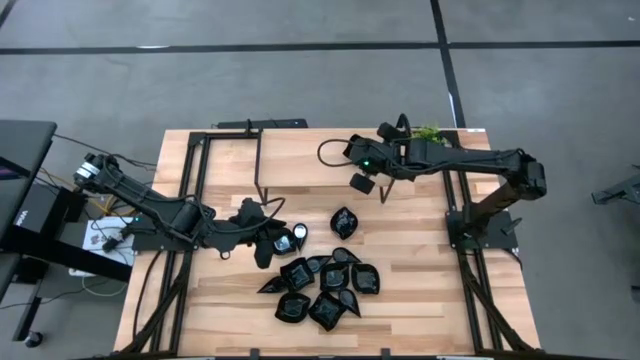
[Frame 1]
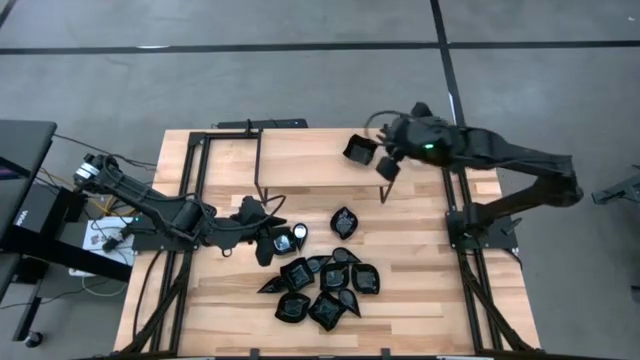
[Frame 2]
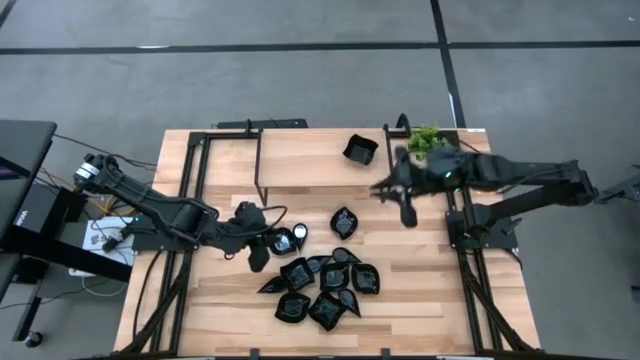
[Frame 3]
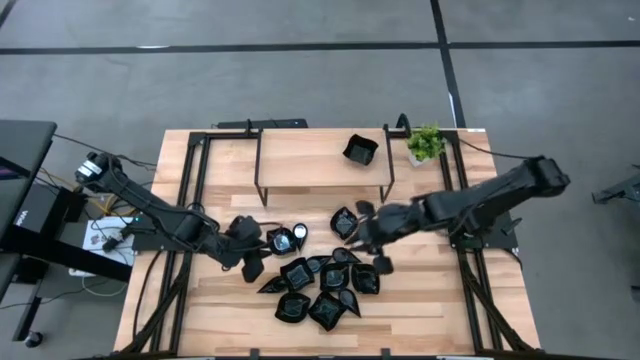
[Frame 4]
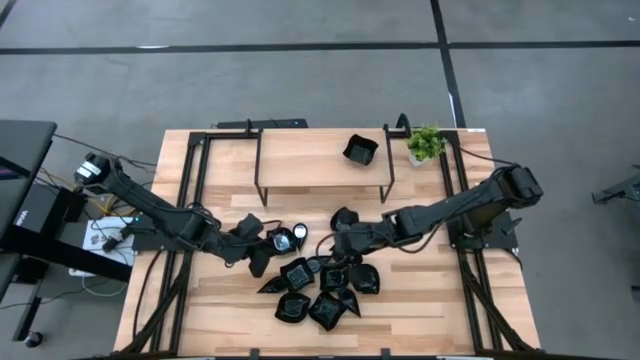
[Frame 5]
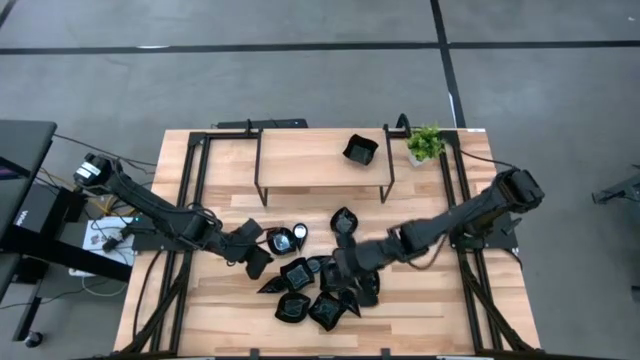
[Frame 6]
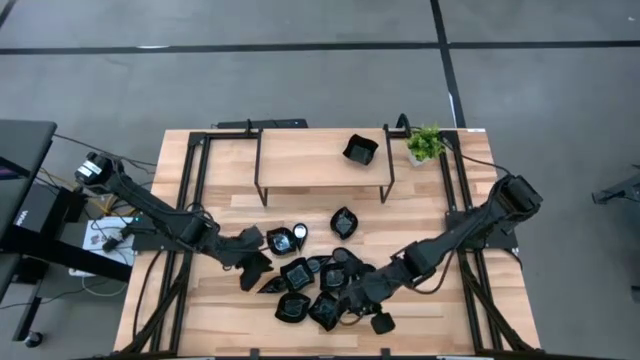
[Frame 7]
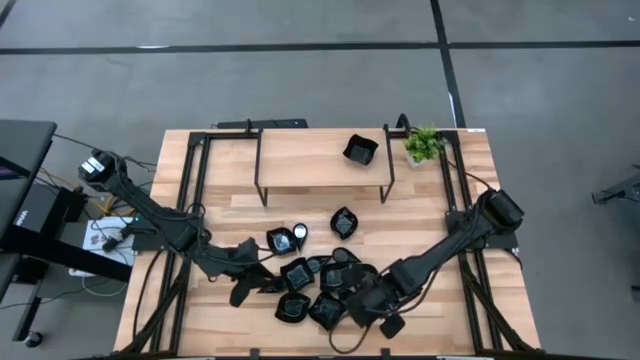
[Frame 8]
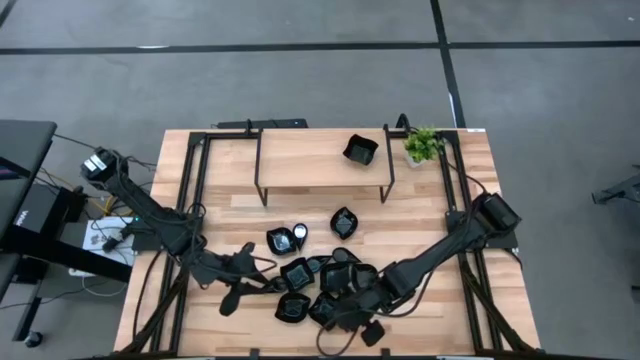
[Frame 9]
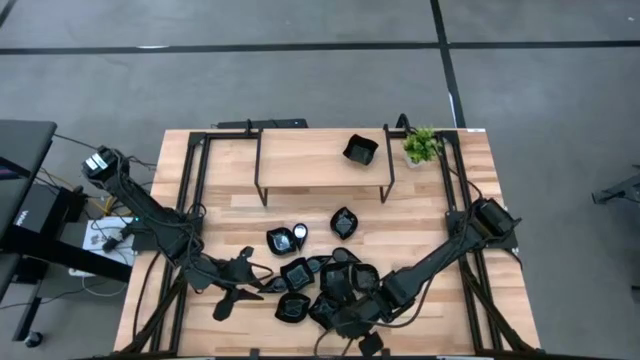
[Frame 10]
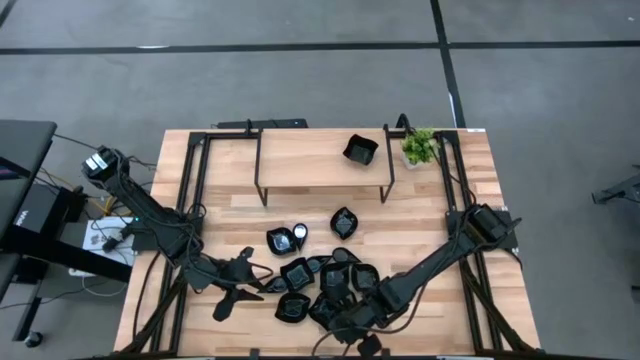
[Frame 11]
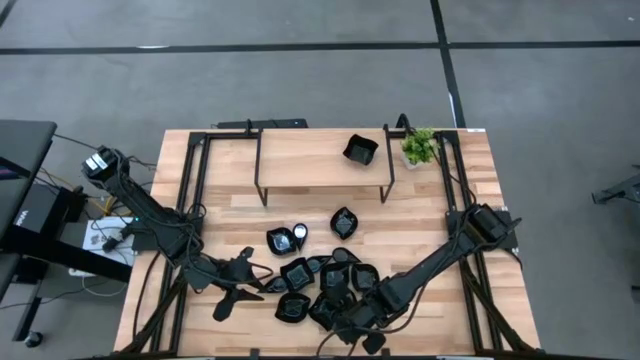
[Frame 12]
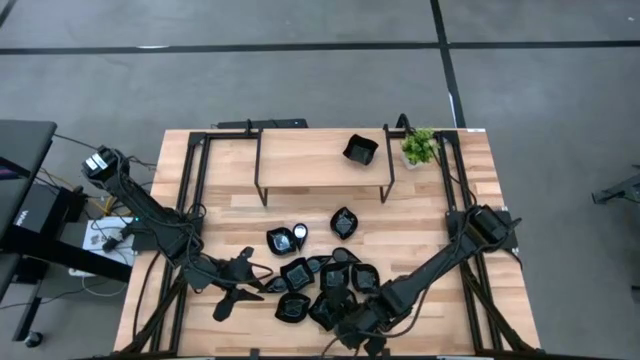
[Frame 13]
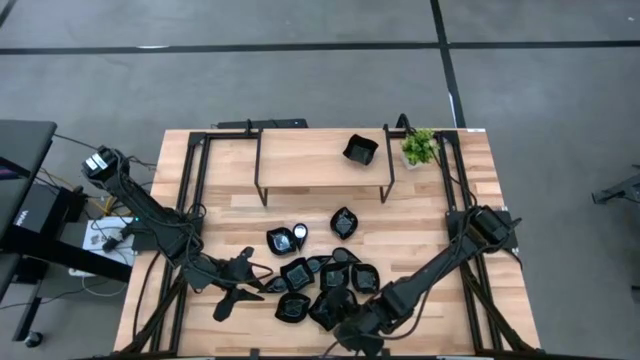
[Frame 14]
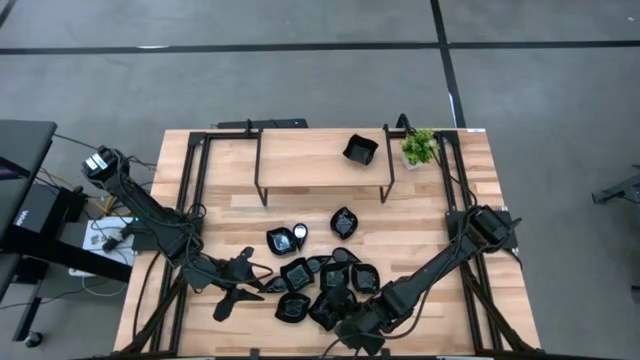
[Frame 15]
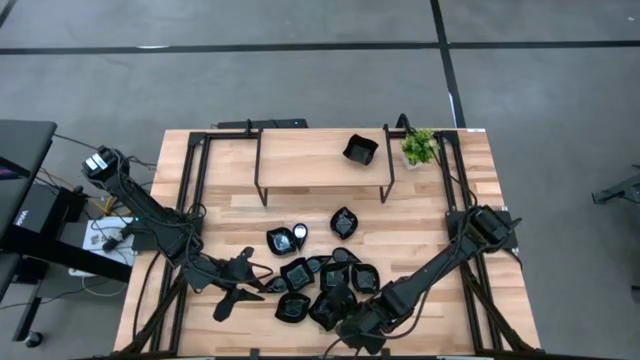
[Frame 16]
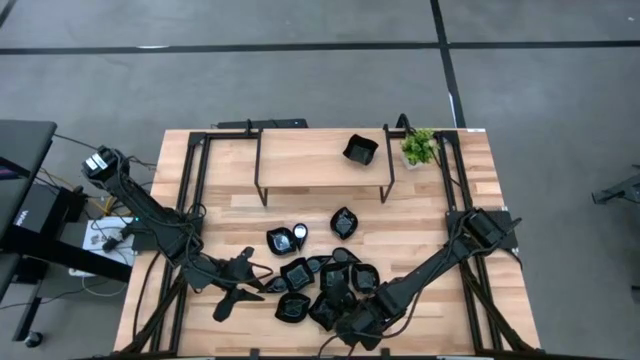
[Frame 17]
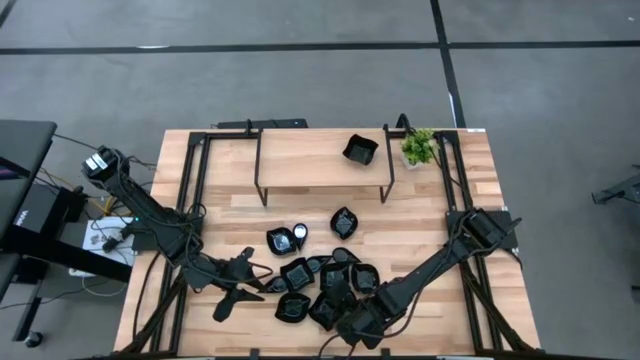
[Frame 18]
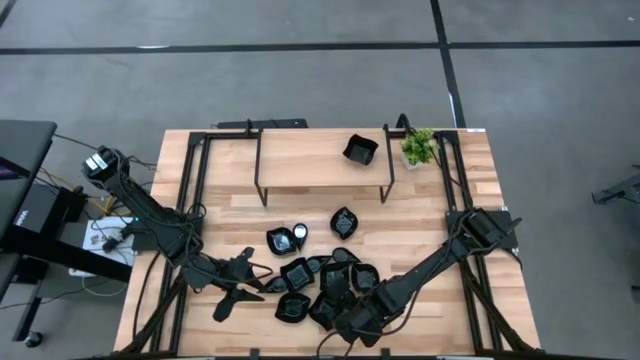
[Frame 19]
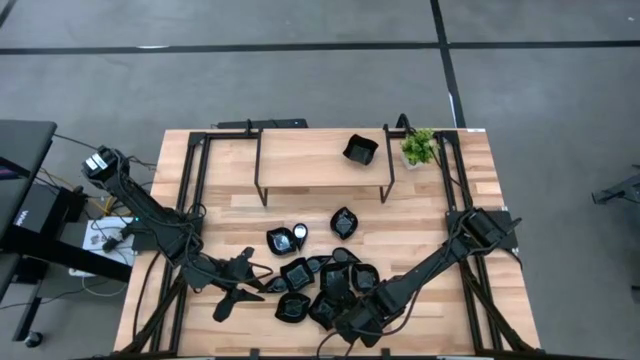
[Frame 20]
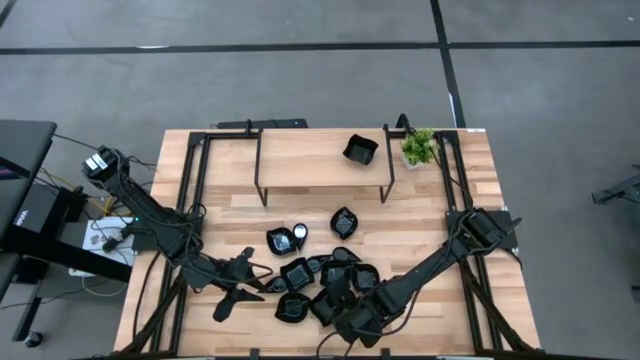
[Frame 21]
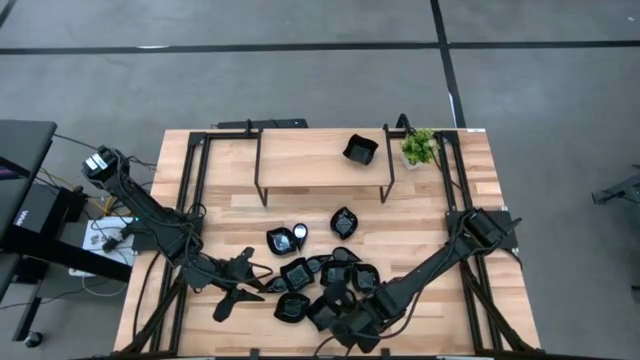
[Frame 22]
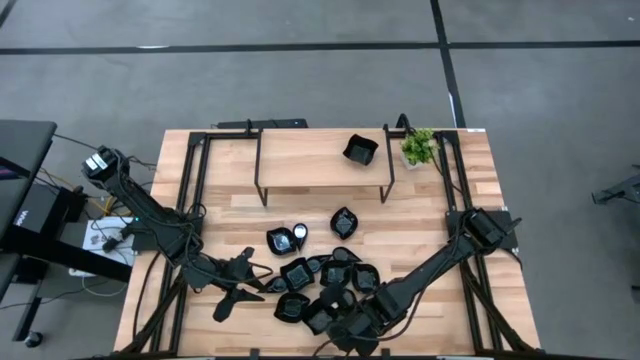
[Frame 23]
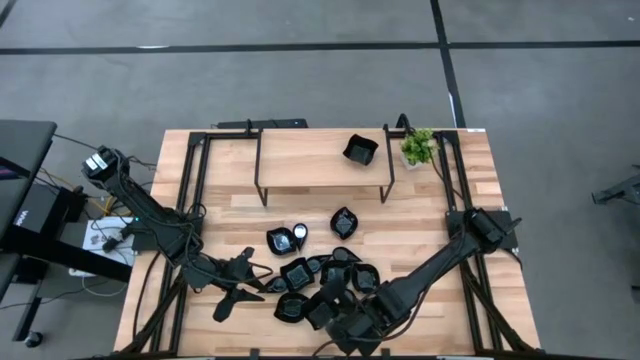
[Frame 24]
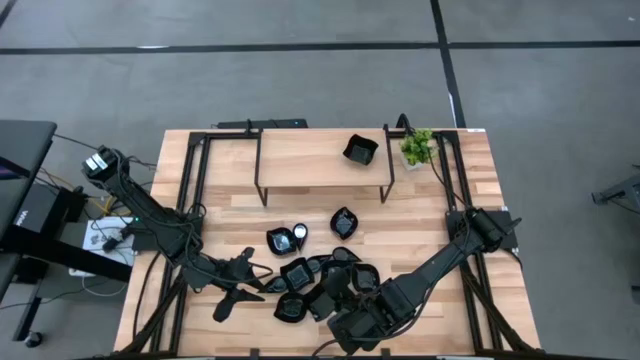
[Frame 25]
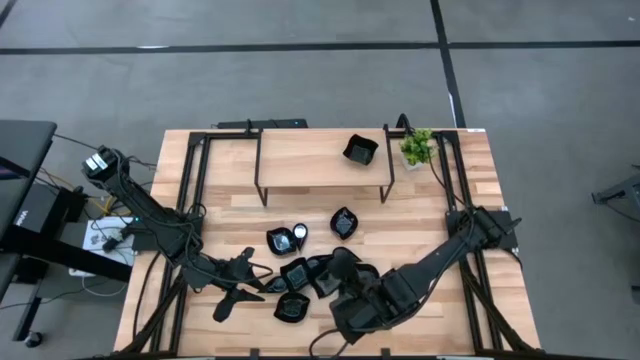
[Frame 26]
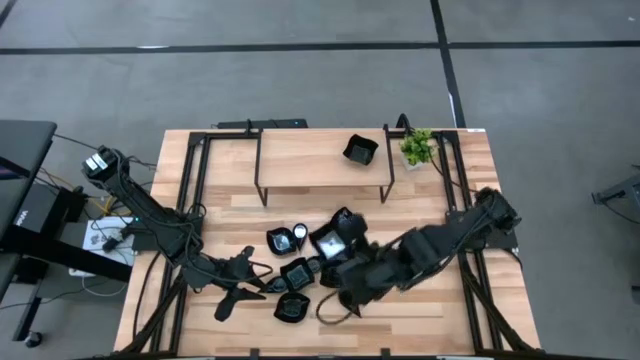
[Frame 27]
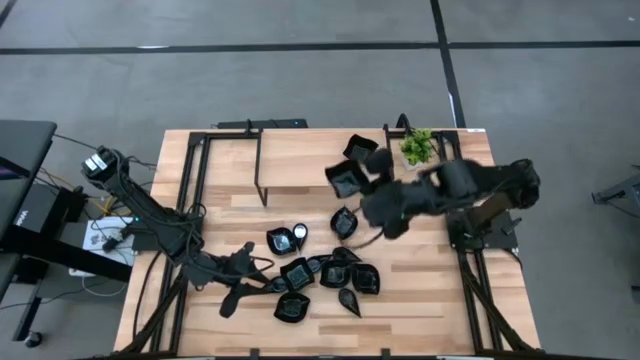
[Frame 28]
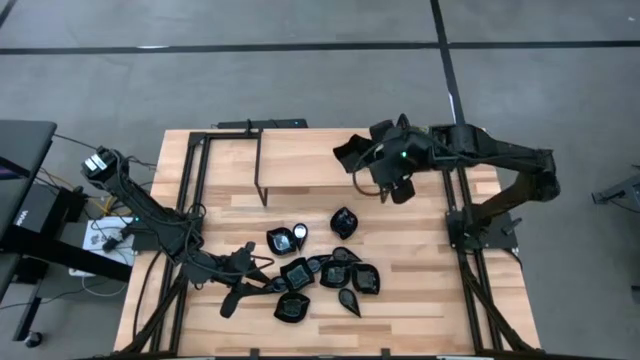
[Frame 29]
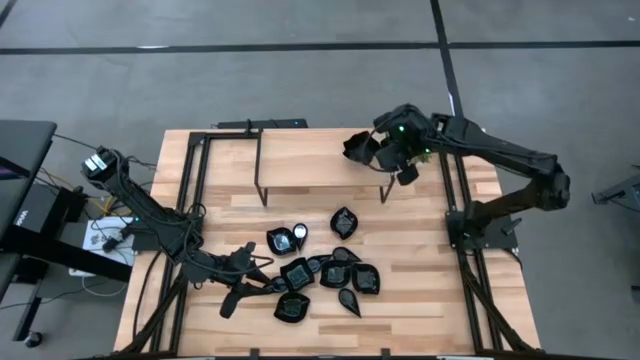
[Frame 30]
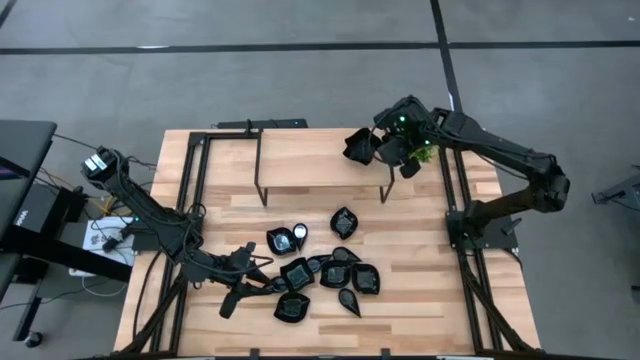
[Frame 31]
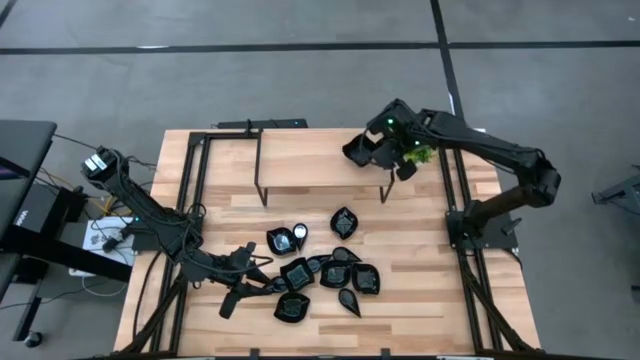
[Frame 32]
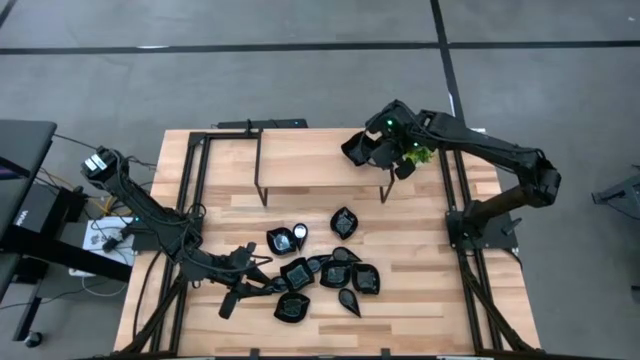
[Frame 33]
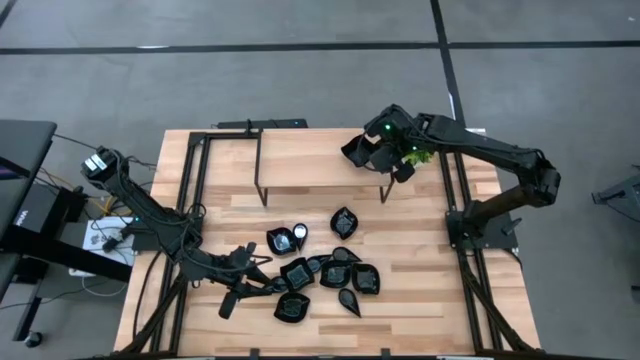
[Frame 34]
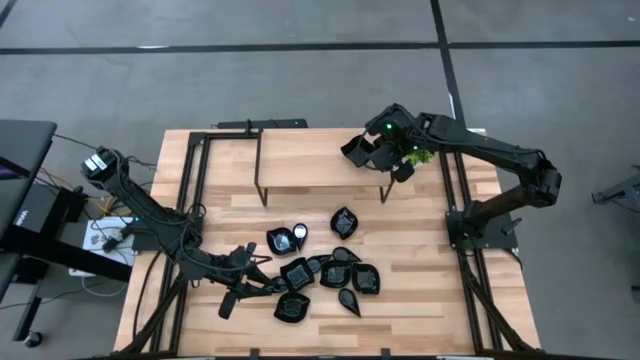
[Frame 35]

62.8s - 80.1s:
Task: Pick & Place Mini shaped plates
Stack the black distorted square plate on the black distorted square plate on the shelf

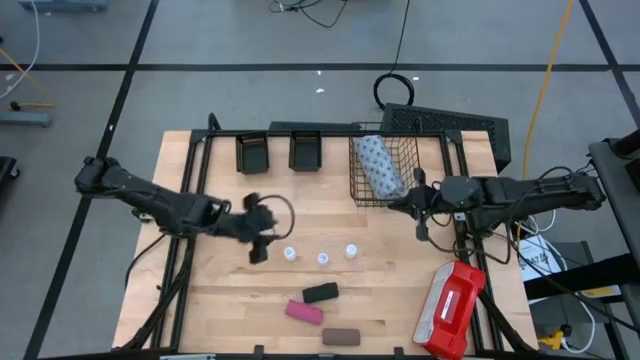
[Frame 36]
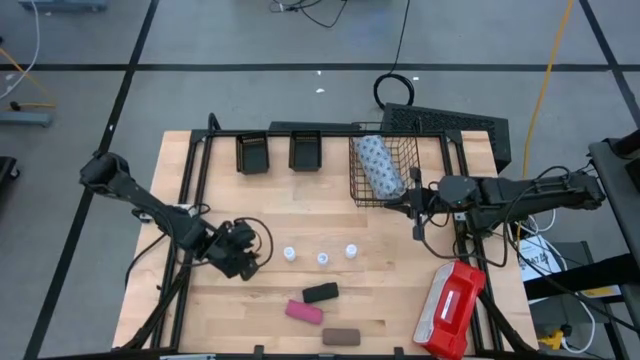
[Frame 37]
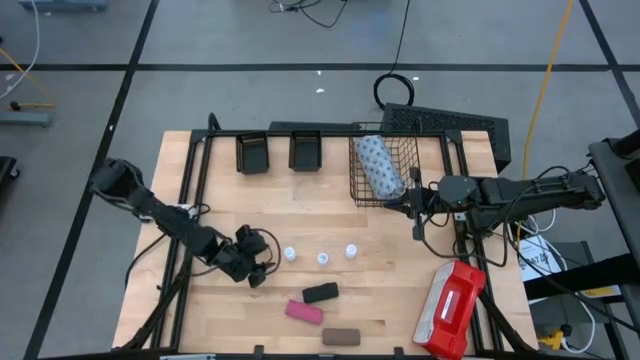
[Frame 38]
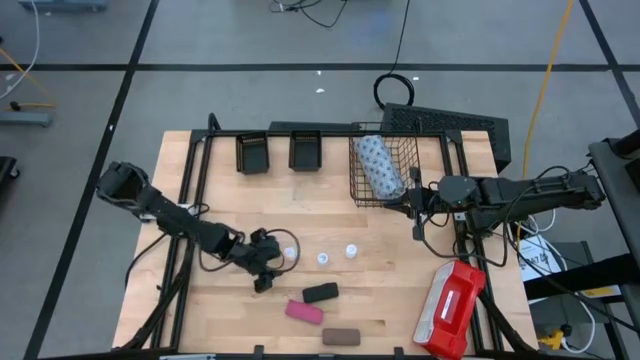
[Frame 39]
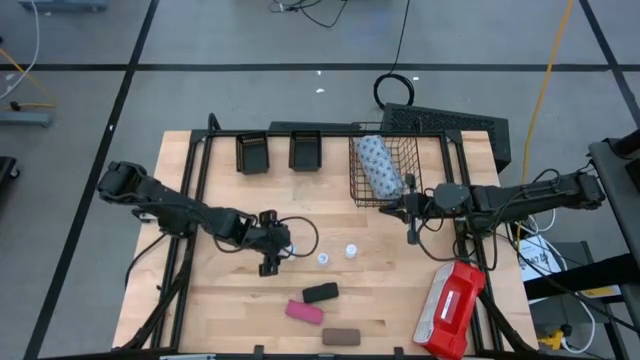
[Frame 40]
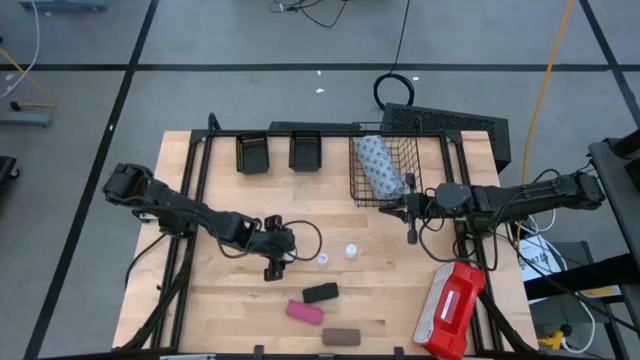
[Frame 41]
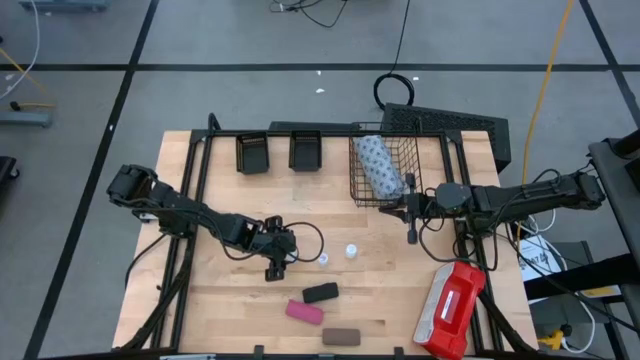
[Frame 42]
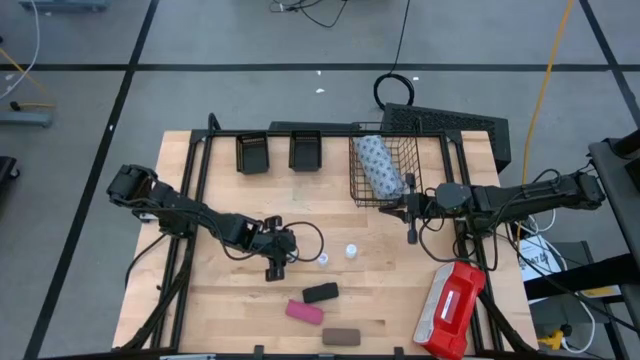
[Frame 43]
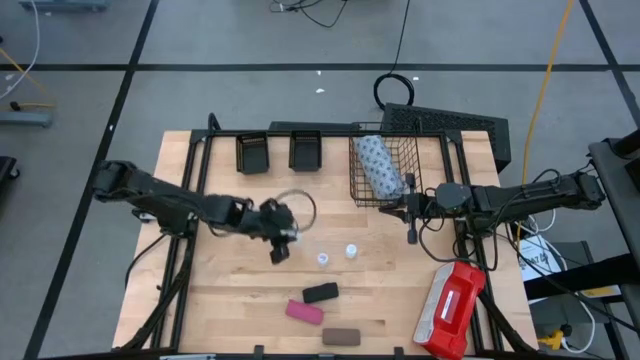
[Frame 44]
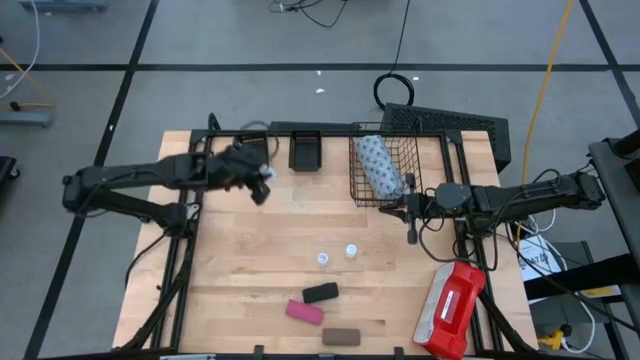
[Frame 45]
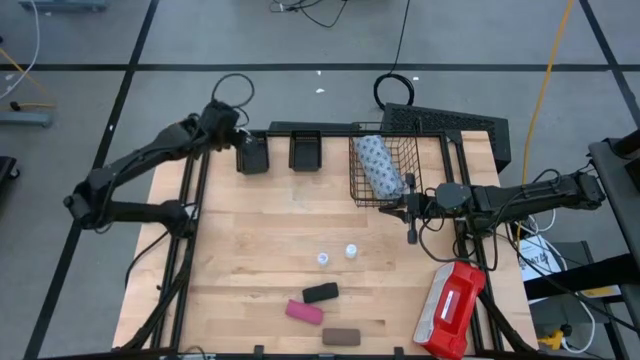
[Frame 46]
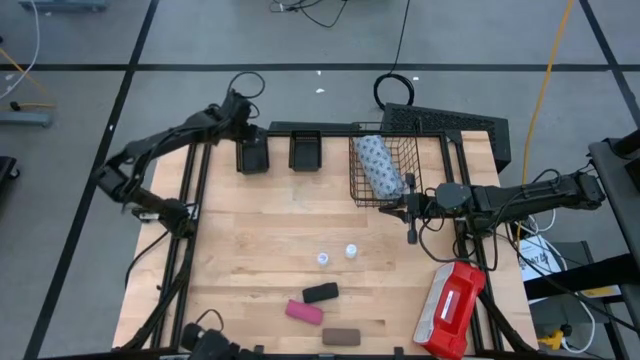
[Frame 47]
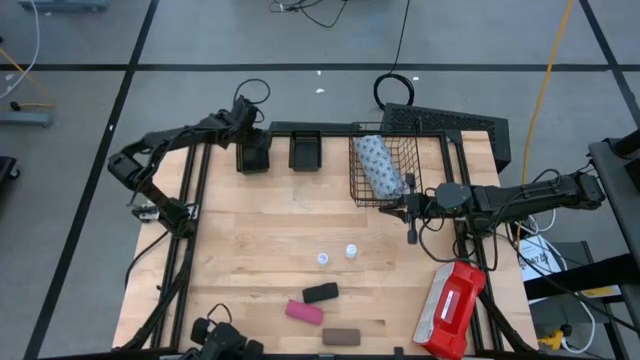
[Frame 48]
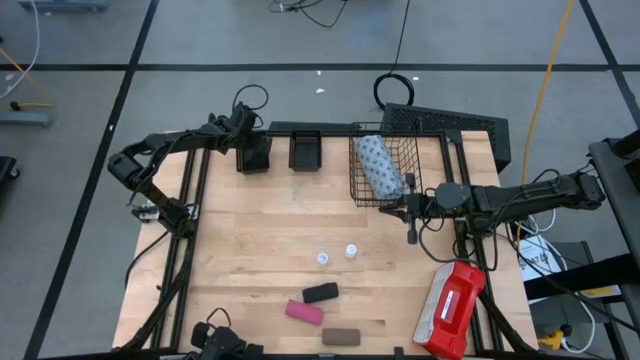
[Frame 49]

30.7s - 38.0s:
Task: Pick & place medical supplies in basket/bin
Put the left white pill bottle into the left black basket
